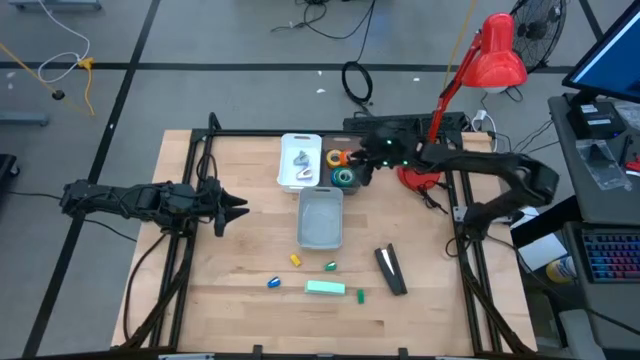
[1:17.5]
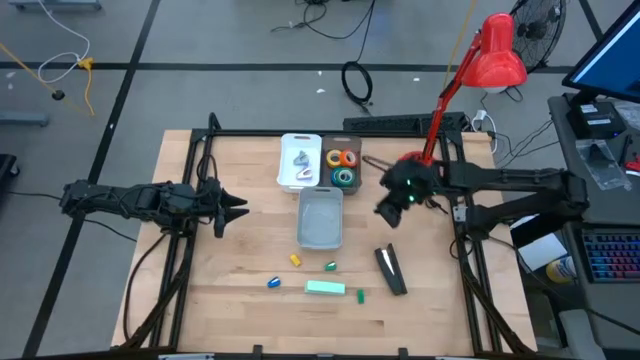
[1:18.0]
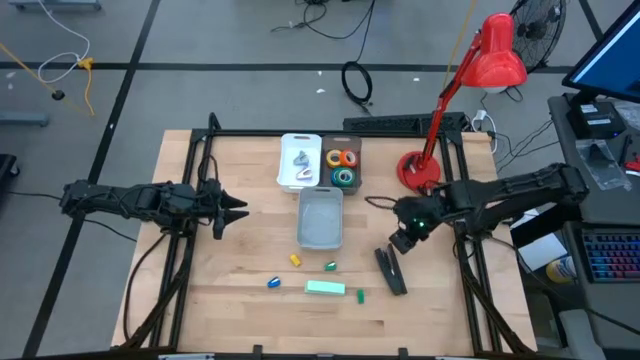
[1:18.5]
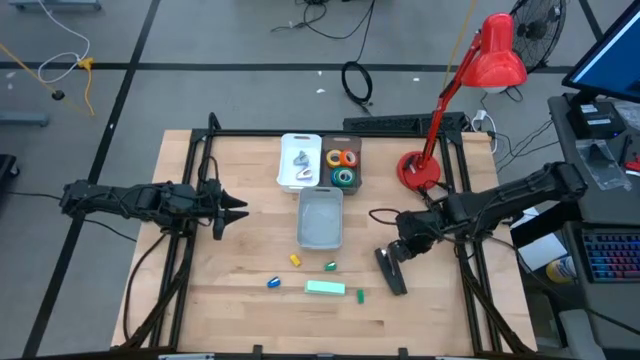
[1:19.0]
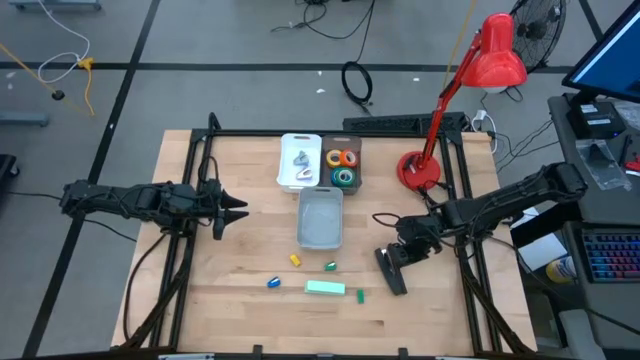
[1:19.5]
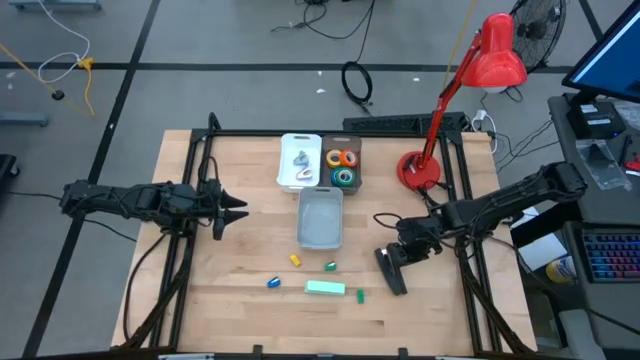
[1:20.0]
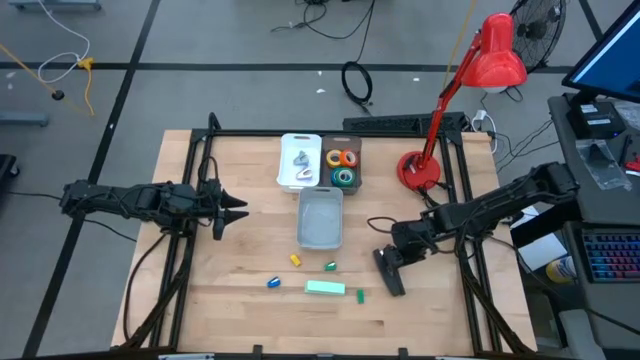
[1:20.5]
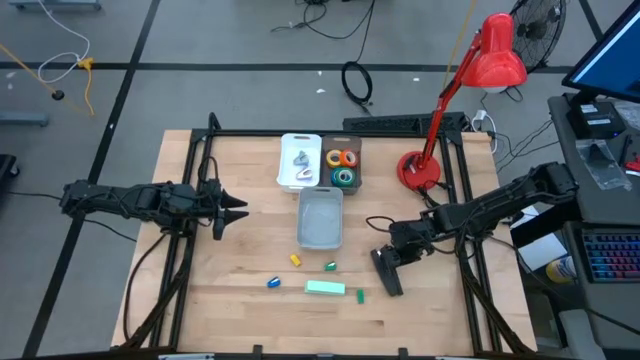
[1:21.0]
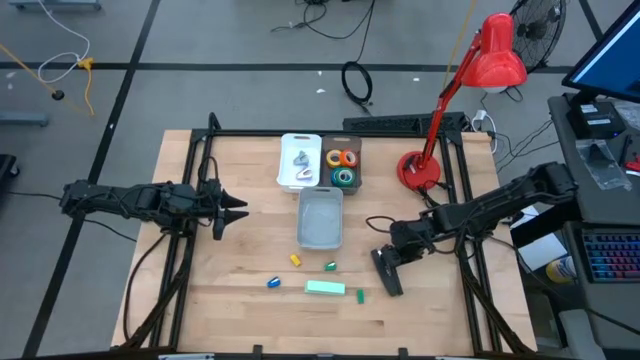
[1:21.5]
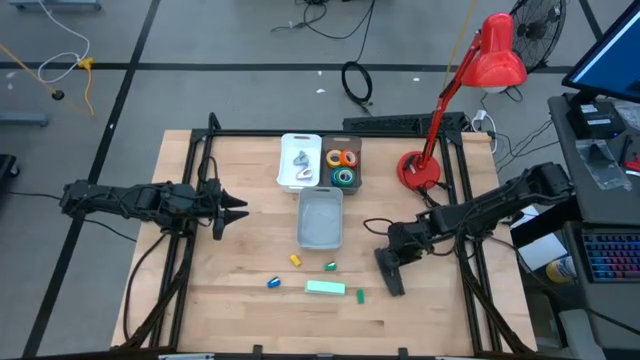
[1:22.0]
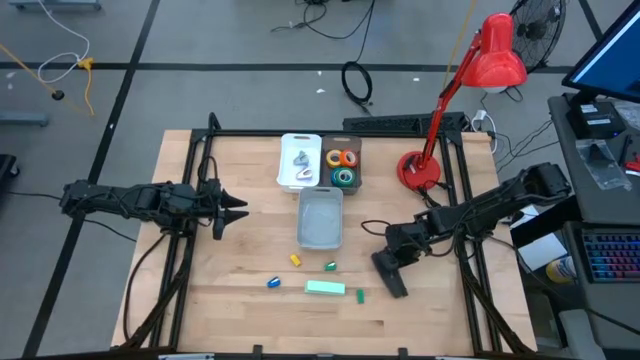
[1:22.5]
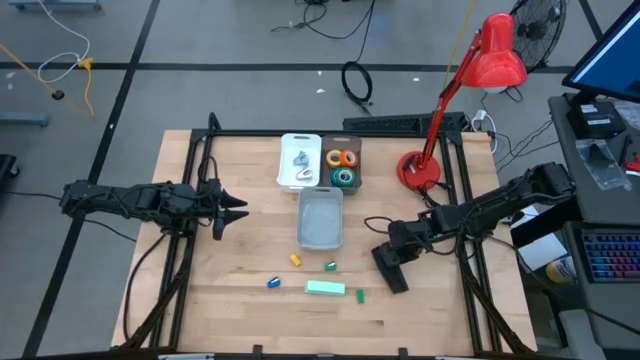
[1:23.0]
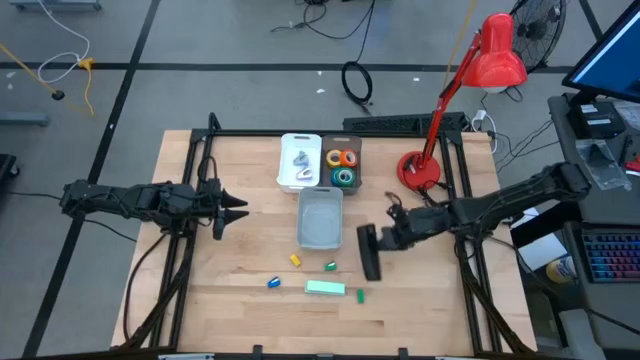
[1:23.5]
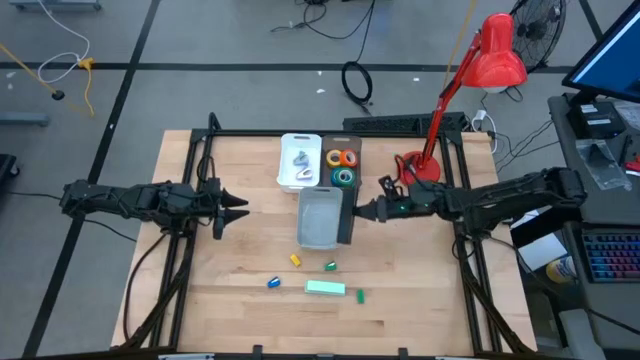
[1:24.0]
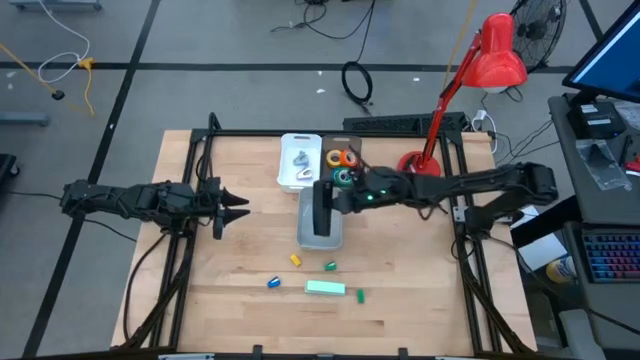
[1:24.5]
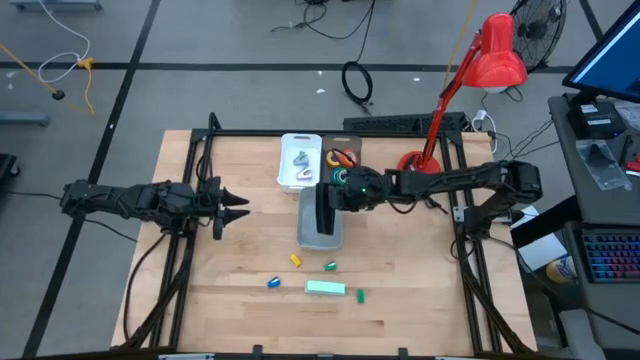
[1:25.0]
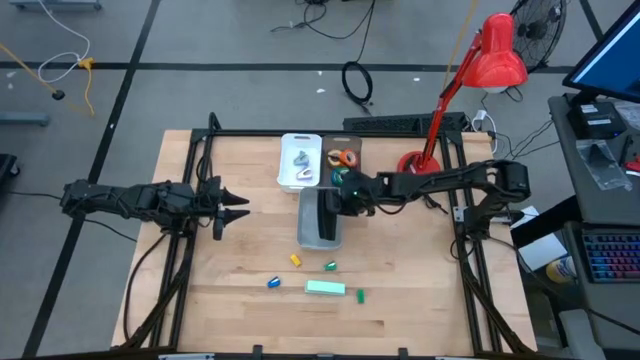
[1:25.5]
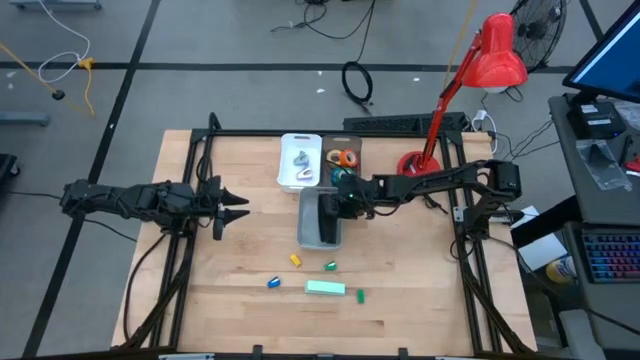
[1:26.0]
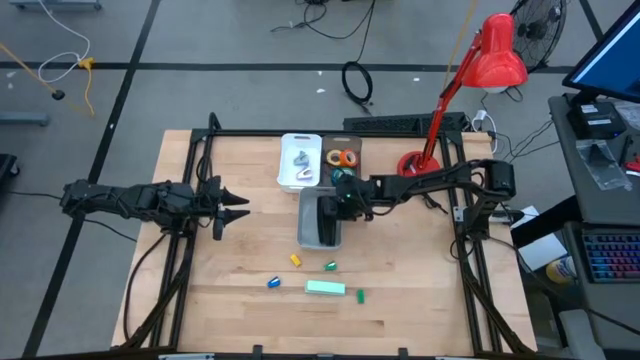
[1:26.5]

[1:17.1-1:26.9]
Task: Pick and place Stapler, Stapler remover, tape
Put the black stapler into the gray bin

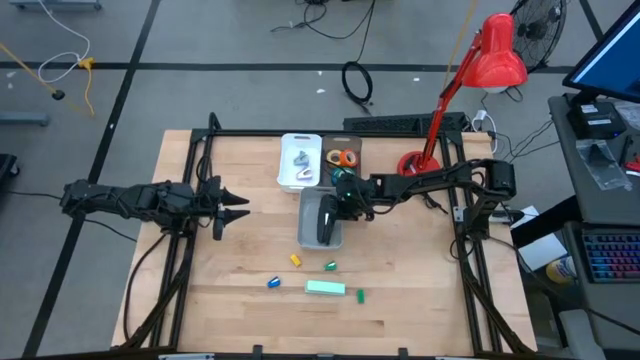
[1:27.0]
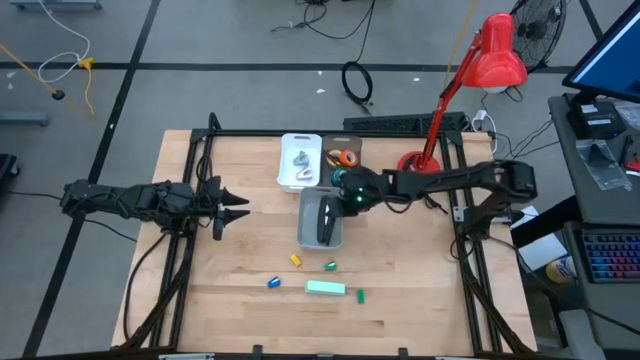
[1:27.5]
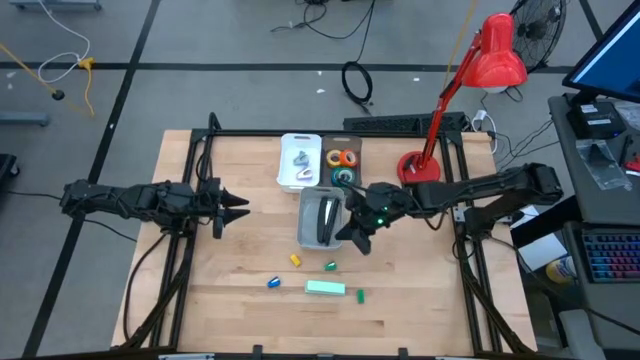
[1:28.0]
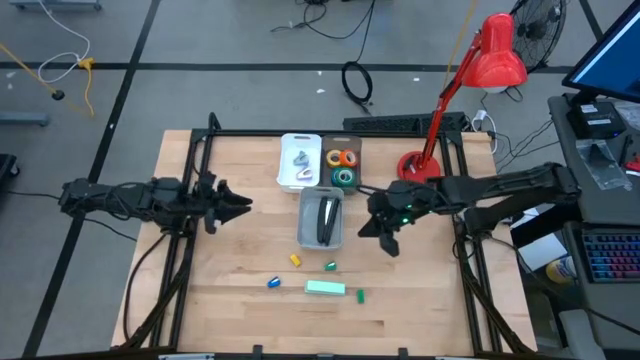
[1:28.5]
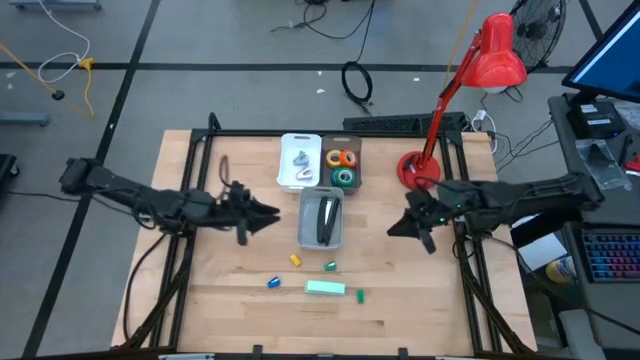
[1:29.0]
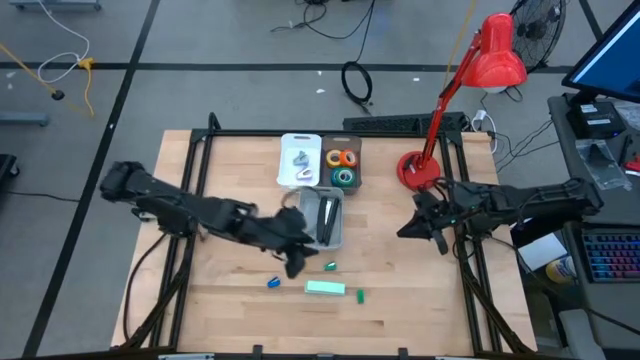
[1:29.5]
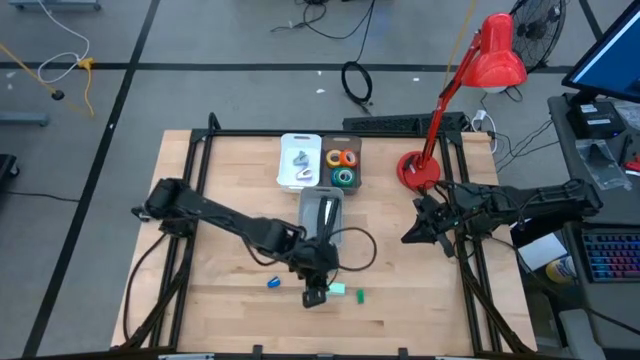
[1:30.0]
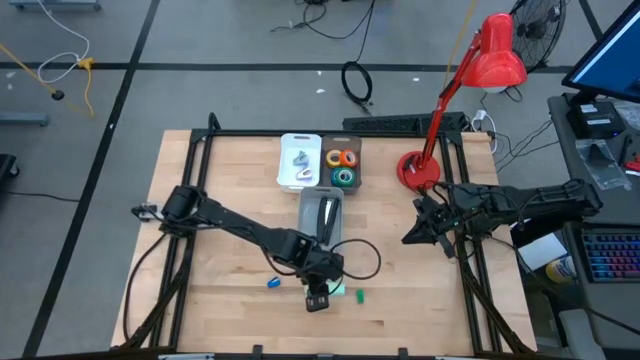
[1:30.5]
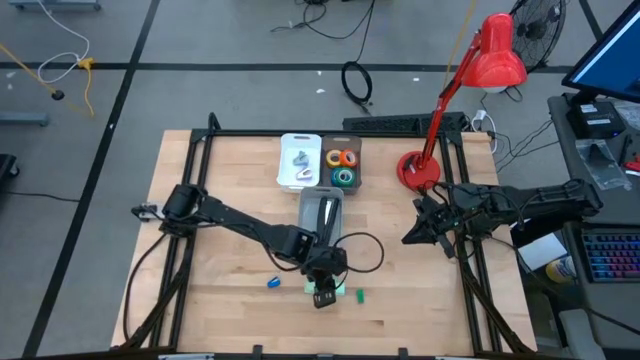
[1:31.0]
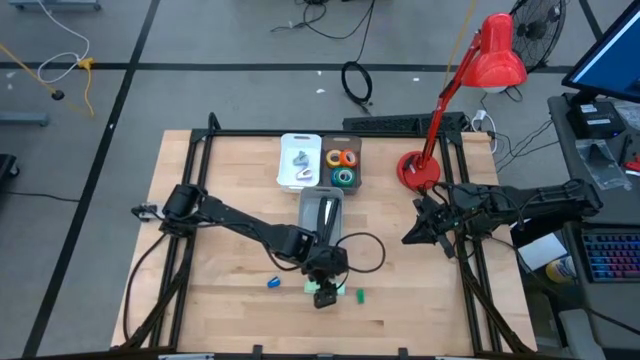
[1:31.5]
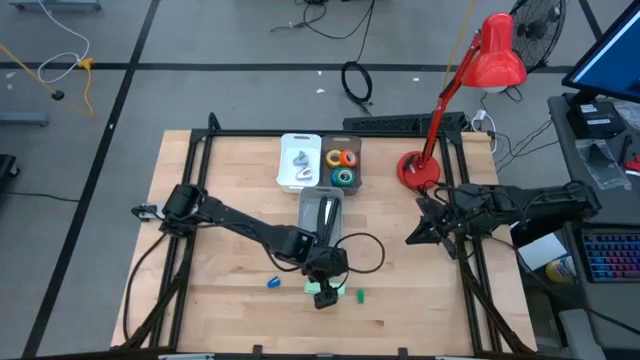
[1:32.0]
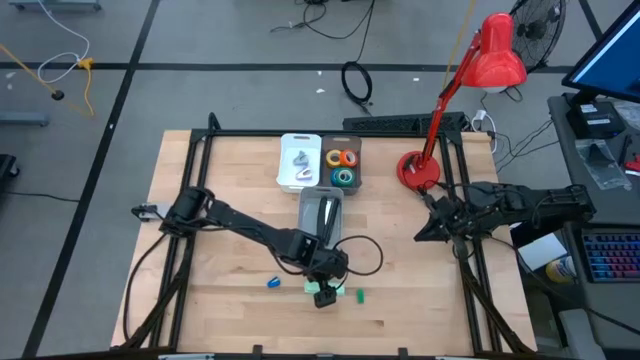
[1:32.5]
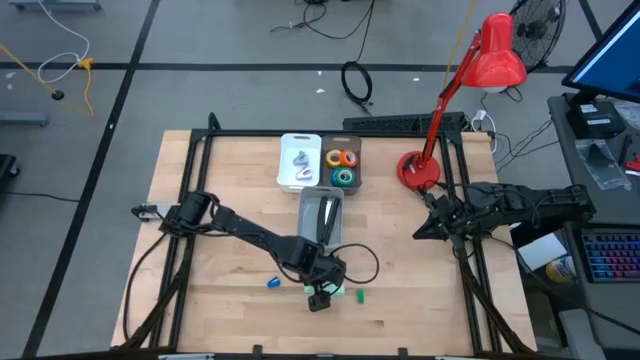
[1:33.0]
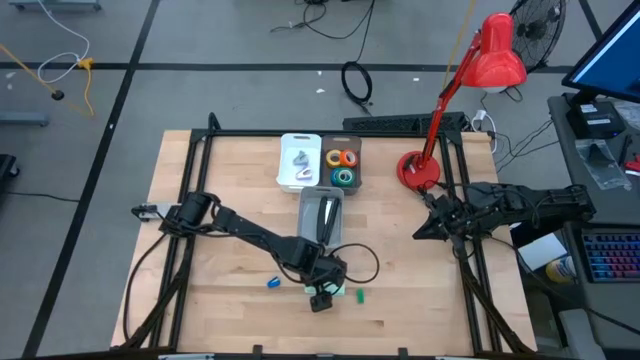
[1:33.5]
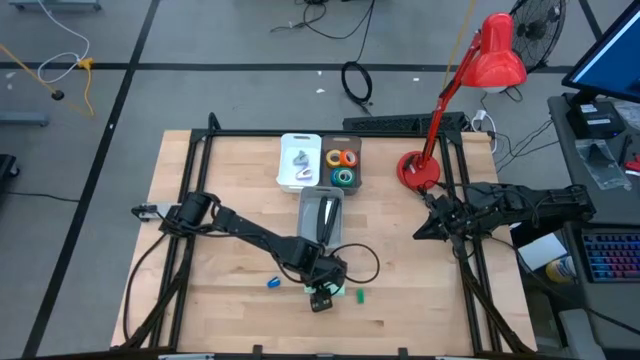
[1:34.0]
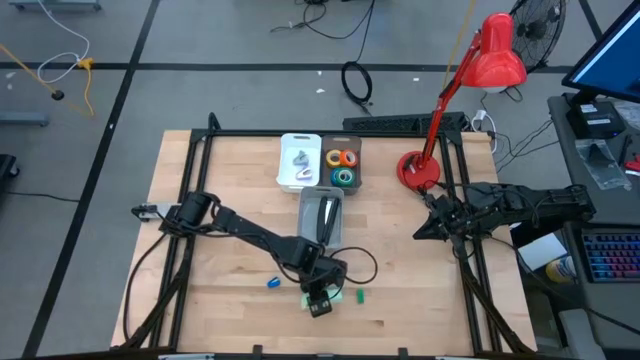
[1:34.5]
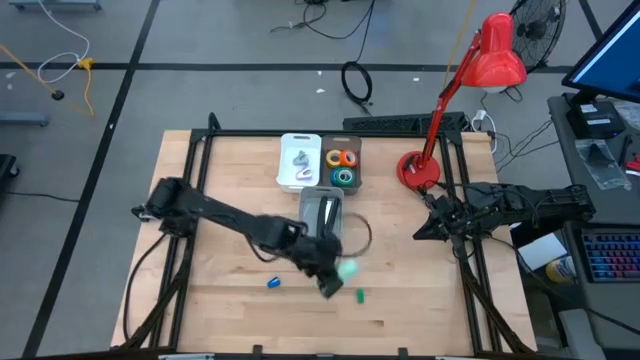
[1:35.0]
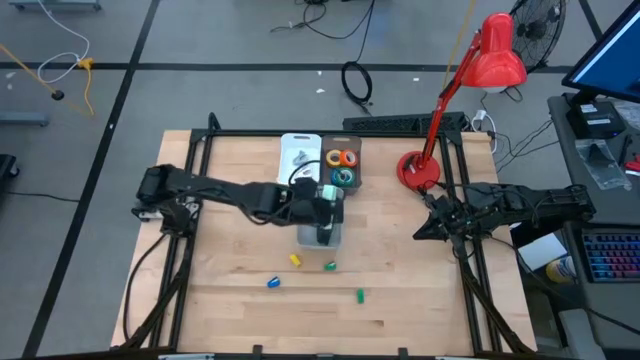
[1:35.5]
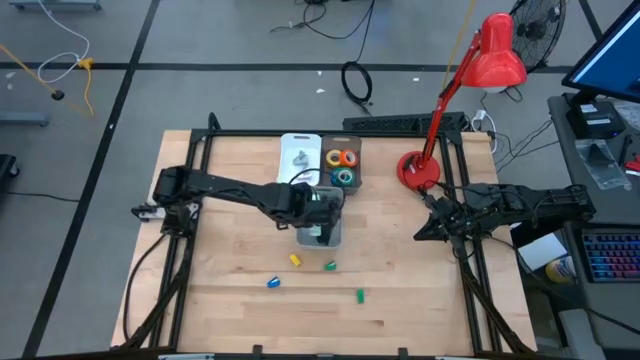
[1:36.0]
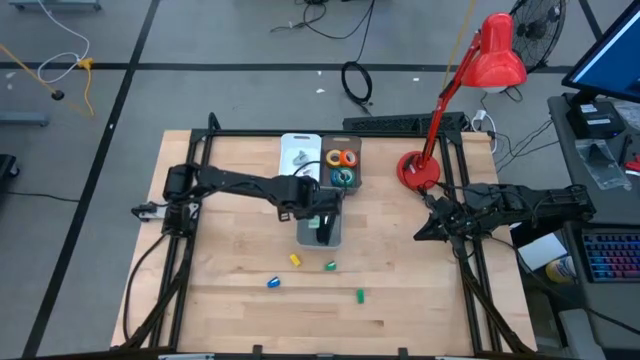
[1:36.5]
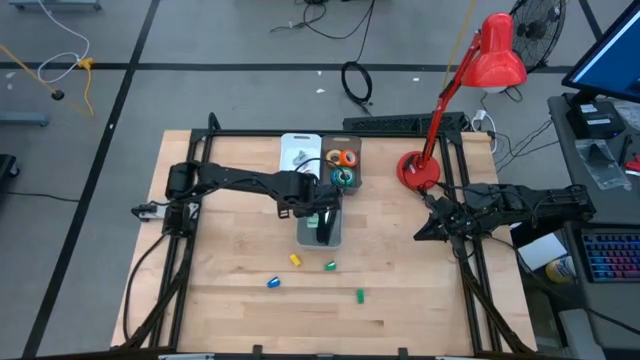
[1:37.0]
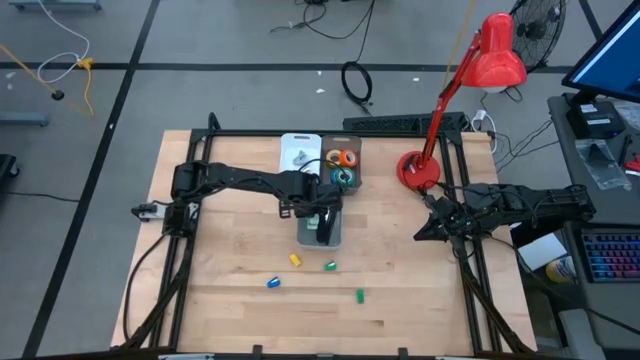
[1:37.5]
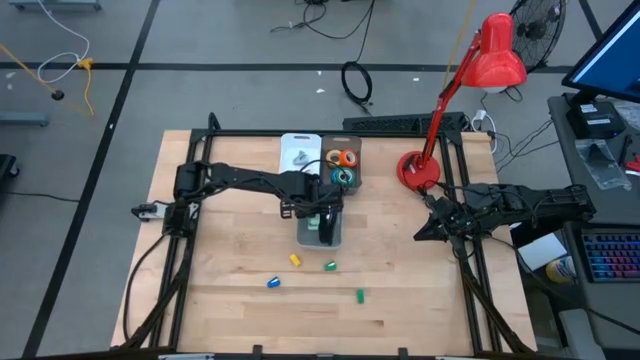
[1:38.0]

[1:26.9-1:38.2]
Put the light green stapler into the gray bin

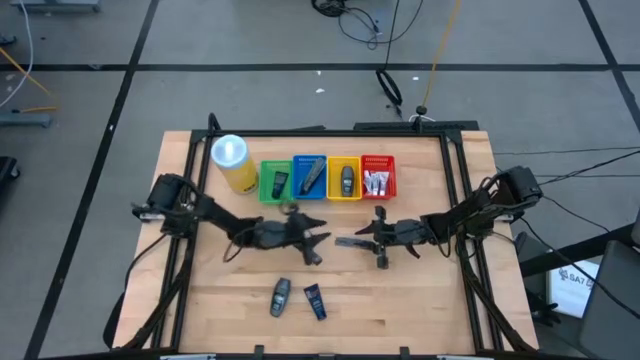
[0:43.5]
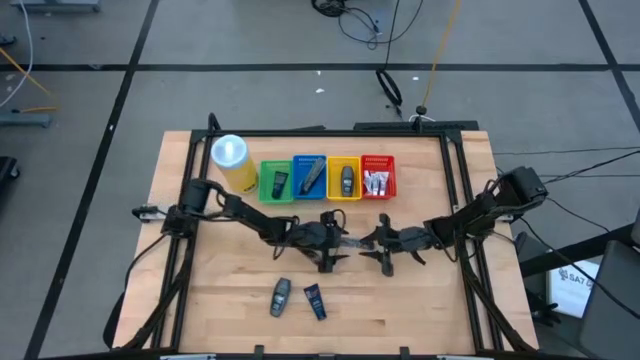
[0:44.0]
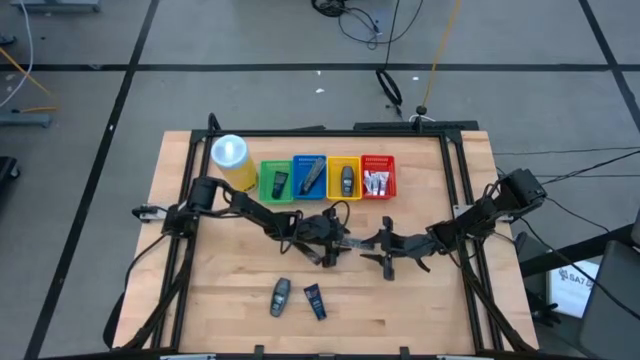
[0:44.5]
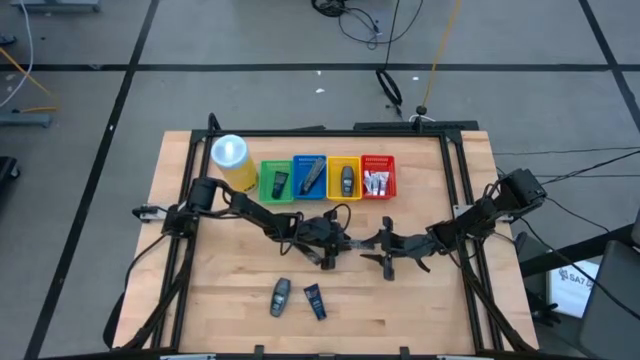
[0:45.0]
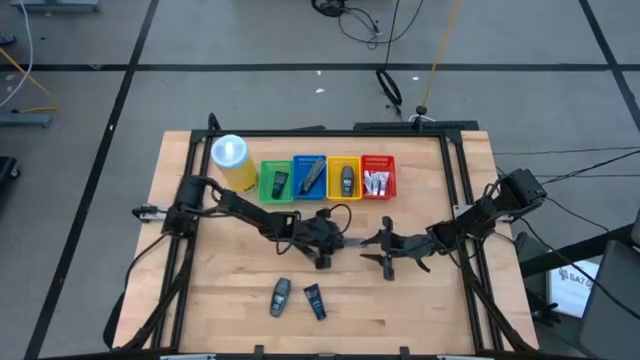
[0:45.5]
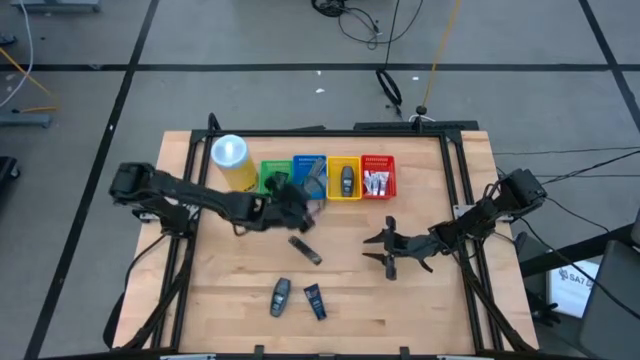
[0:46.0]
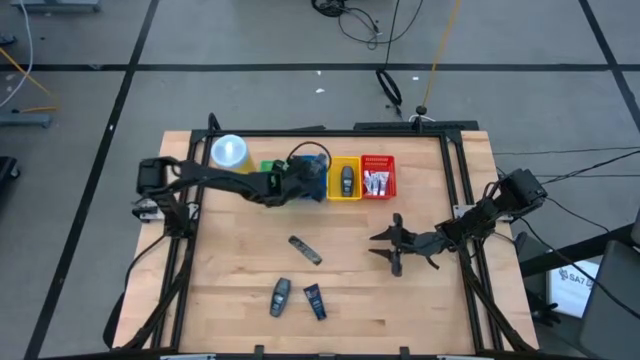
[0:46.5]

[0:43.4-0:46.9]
Task: Pick & Place Travel size toiletries
Put the hair comb into the blue basket
